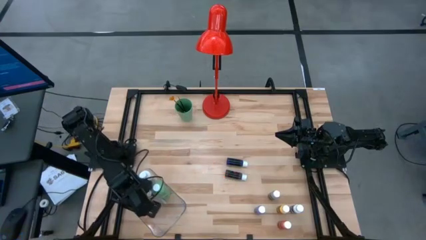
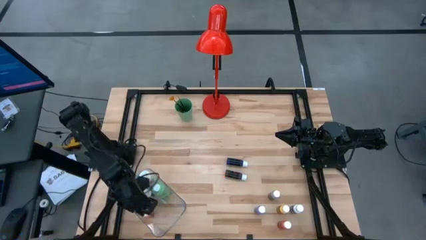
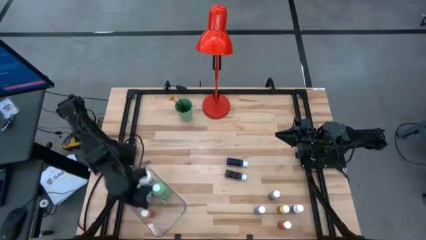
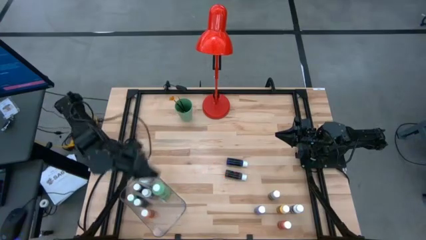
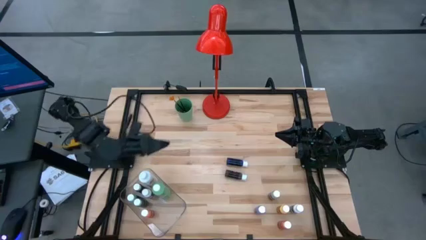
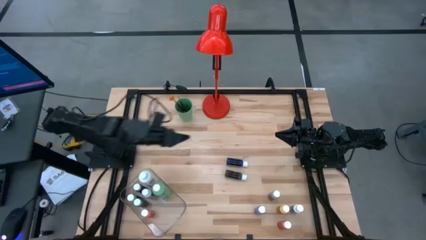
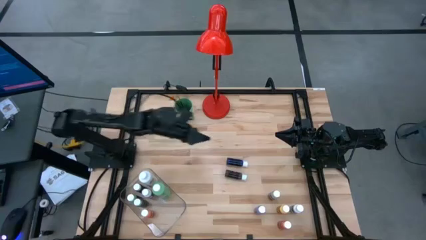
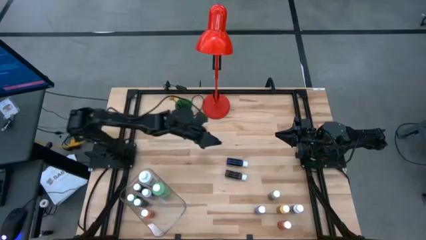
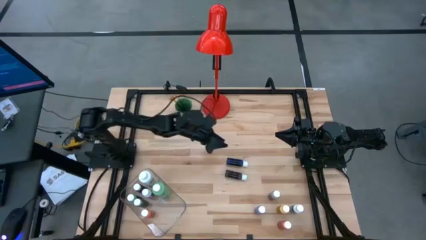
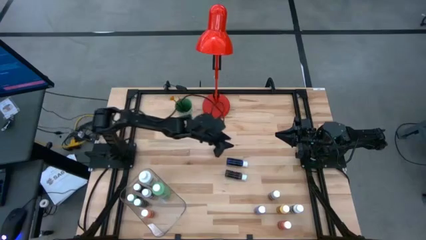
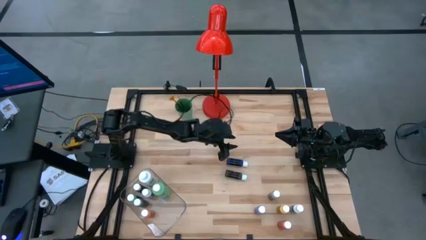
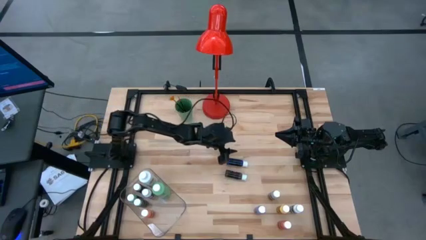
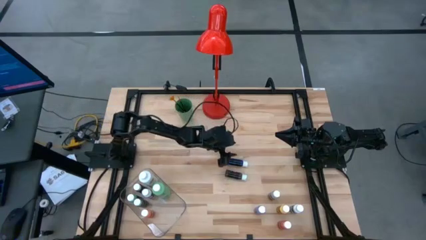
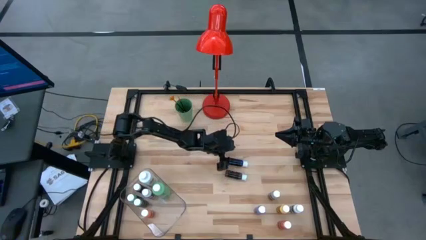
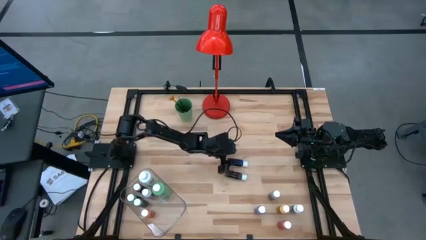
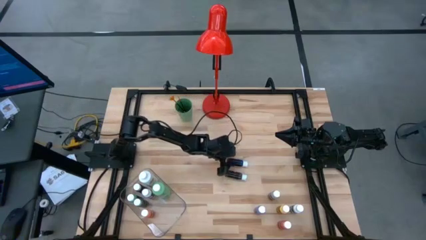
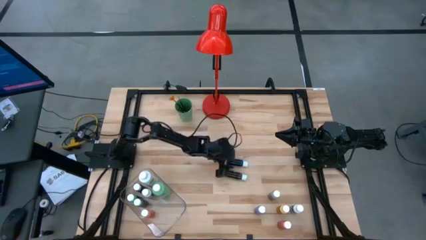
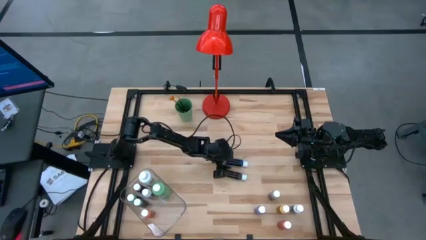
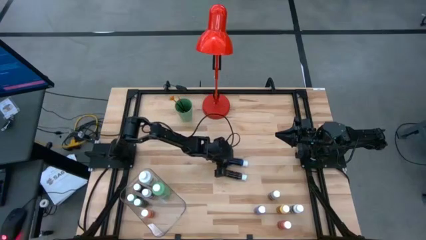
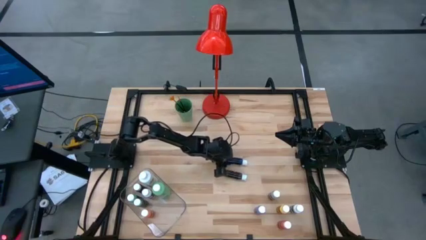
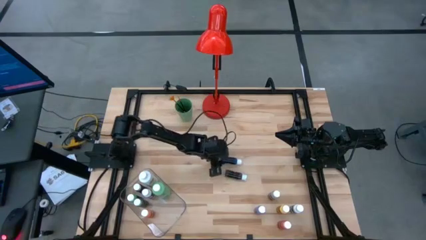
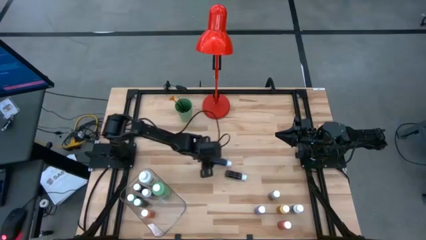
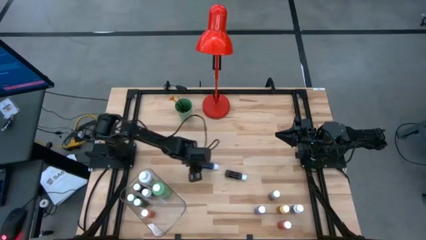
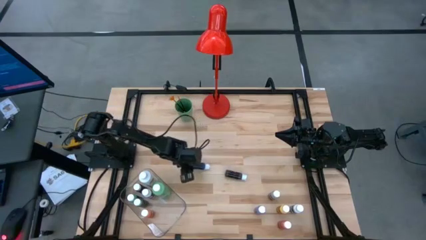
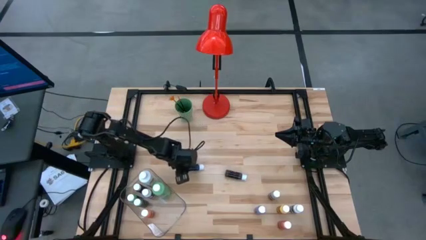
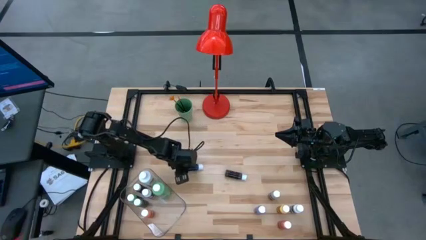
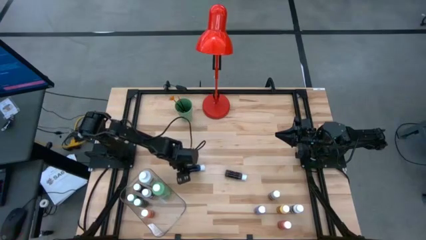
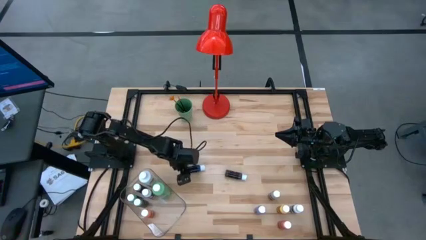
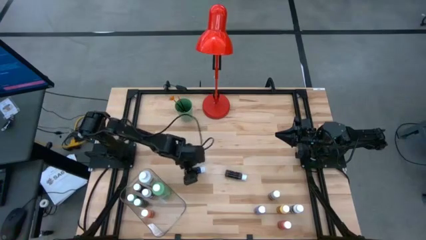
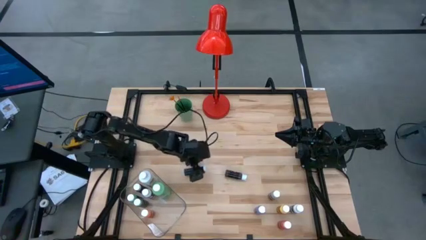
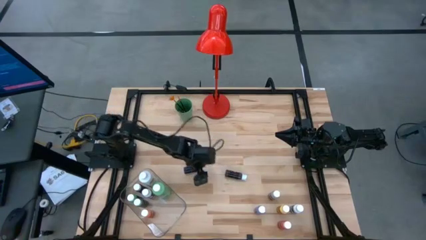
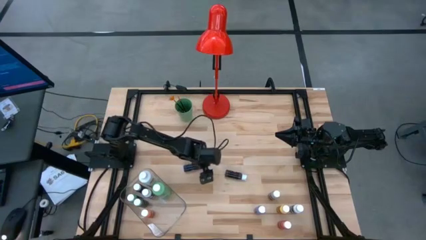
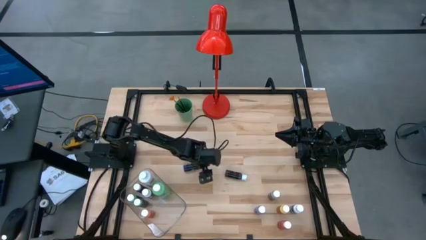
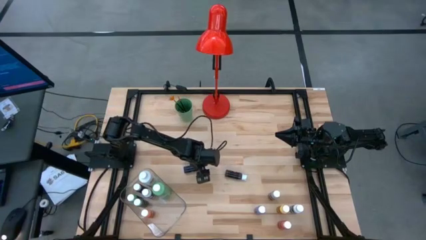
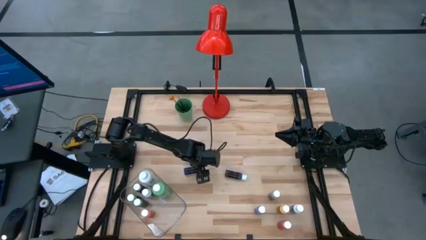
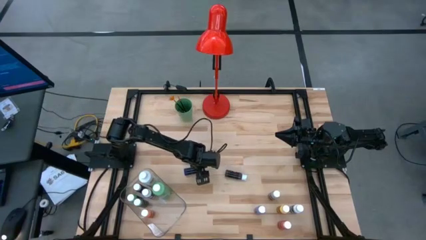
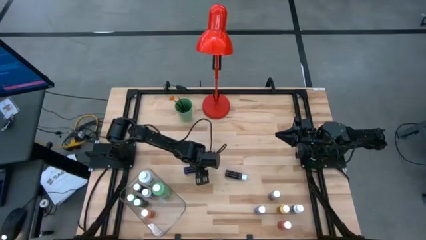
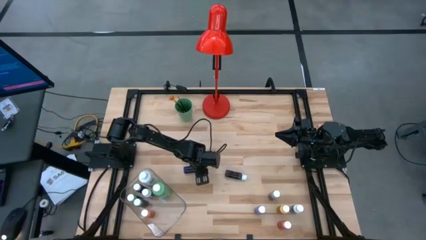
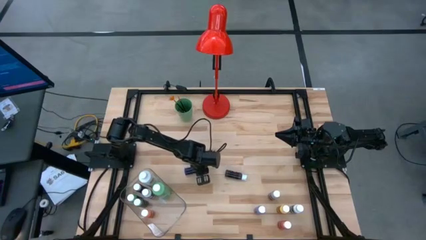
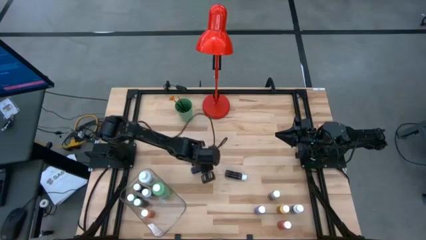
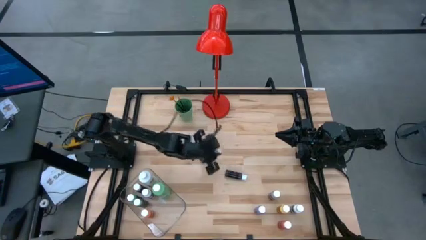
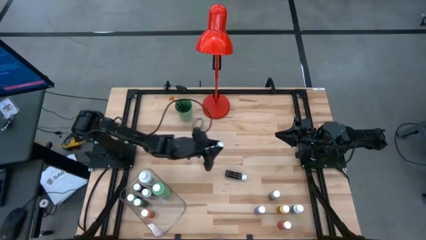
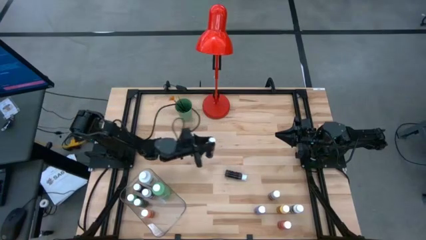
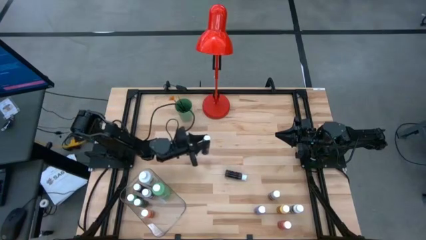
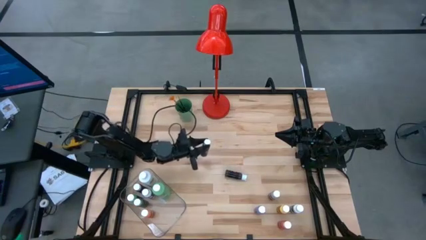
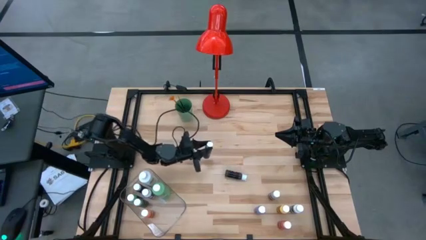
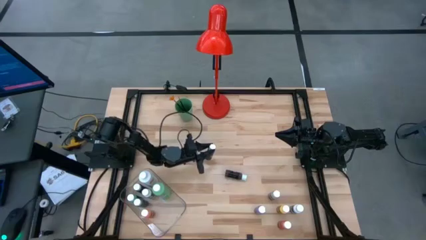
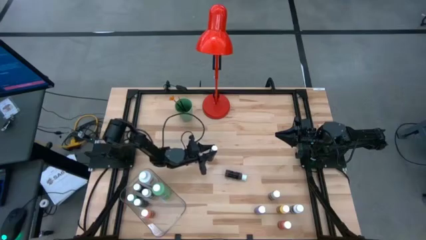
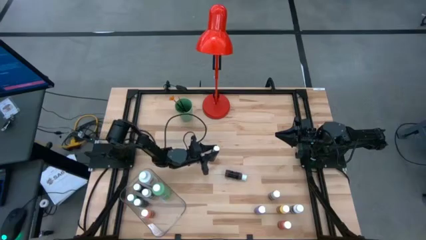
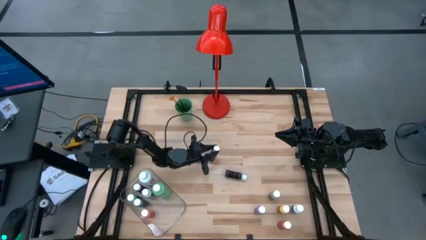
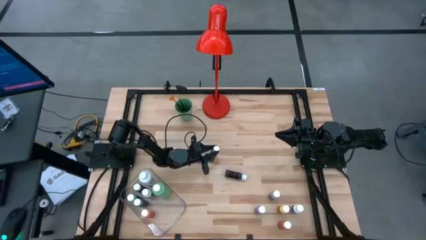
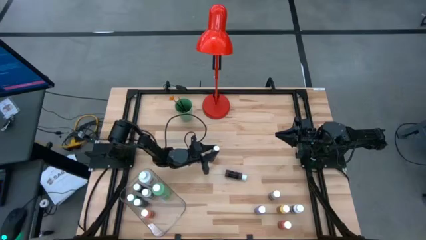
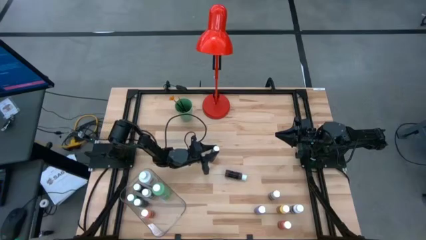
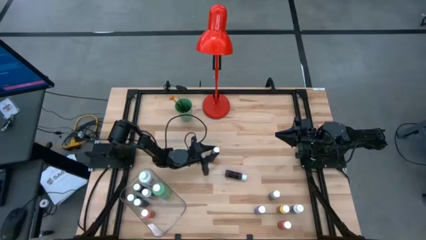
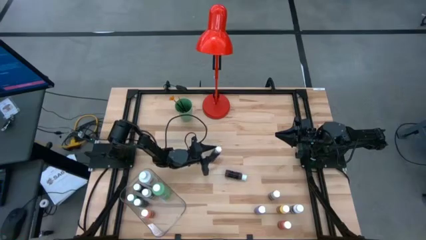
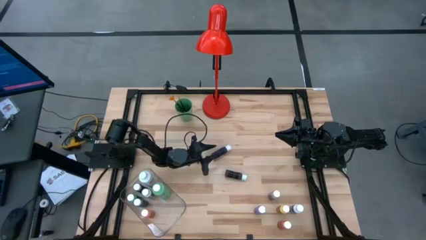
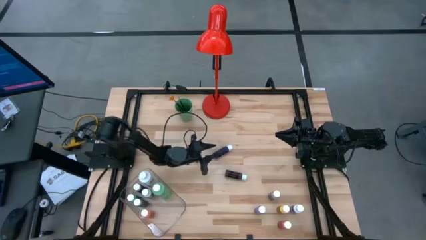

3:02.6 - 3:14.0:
Task: Pick & Place Paint Supplies
Adjust the blue coloring bottle to the center of the table

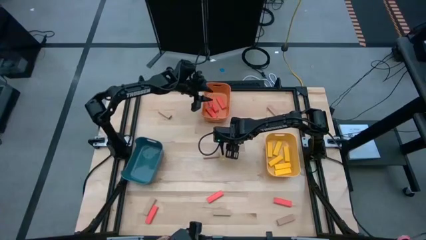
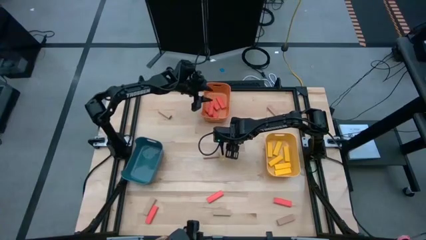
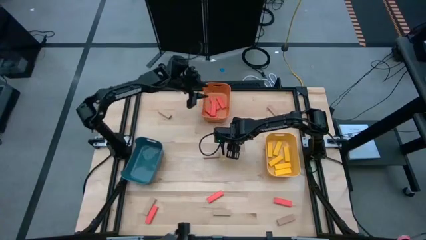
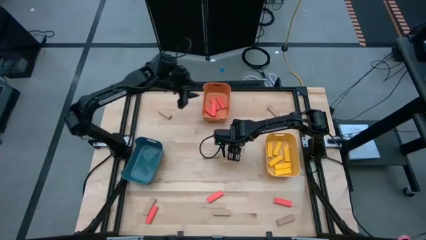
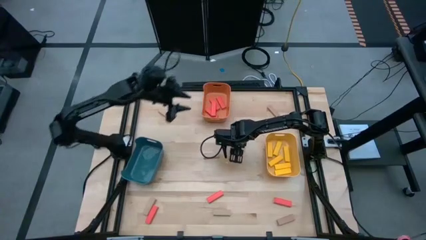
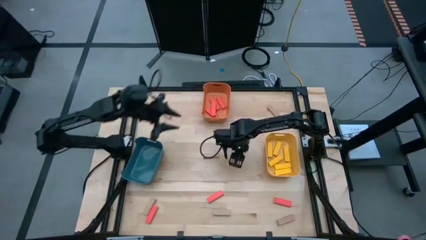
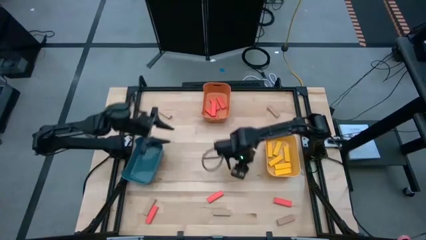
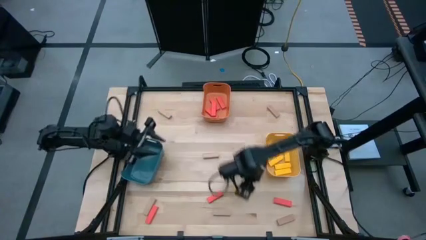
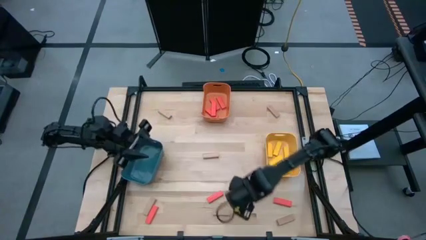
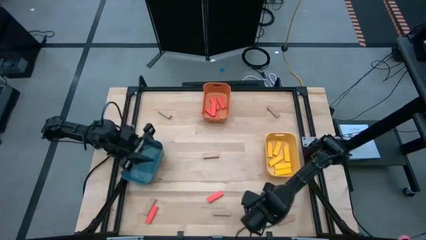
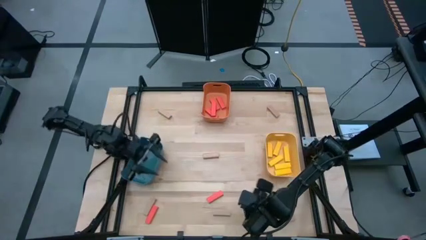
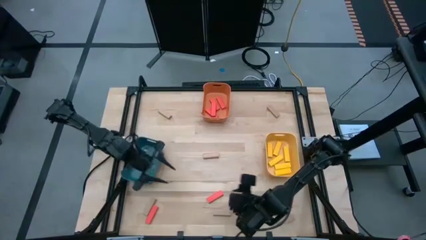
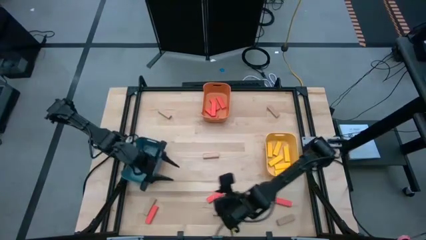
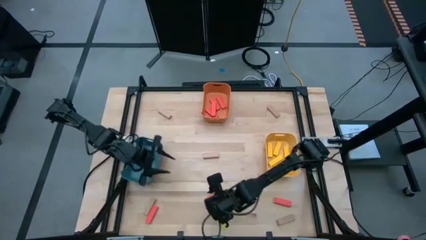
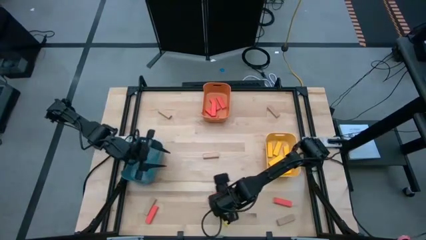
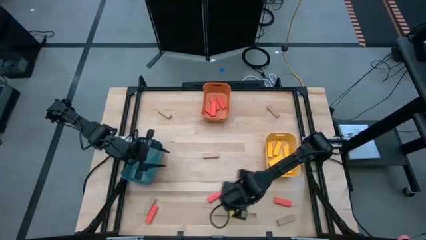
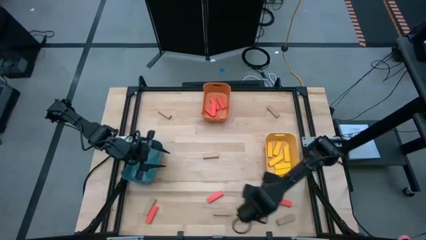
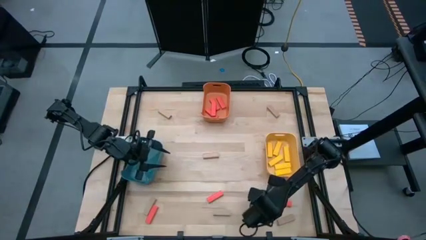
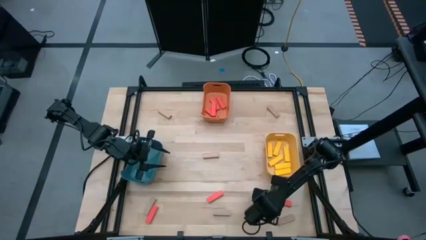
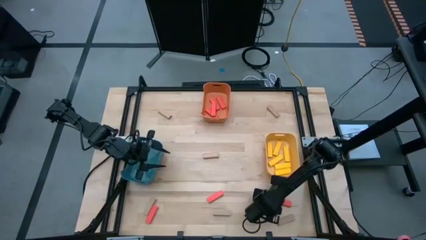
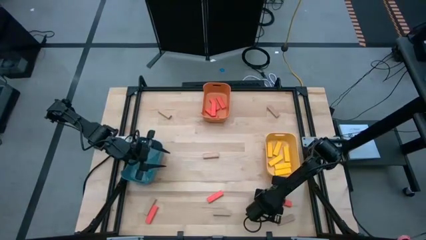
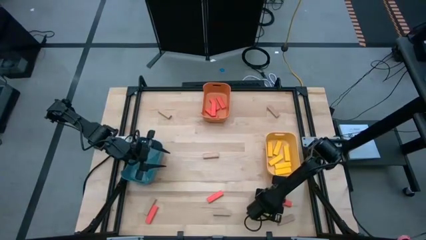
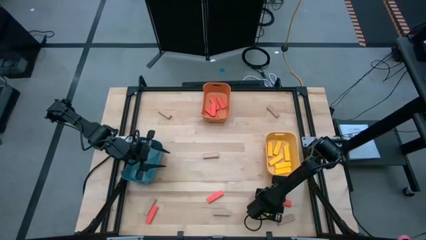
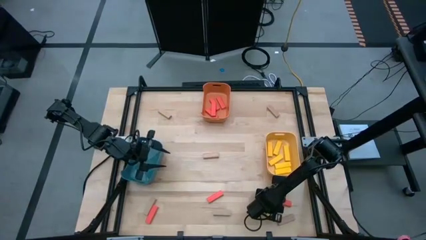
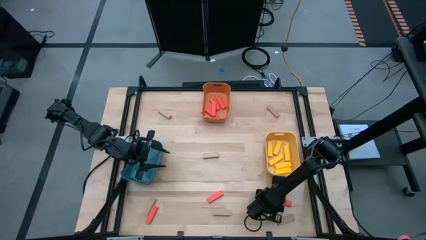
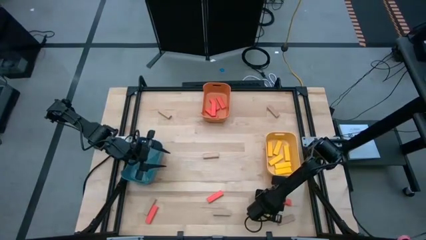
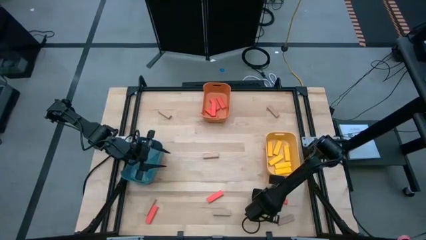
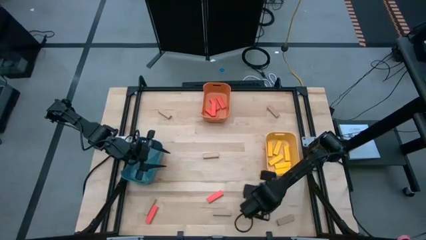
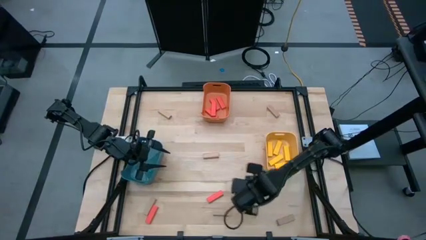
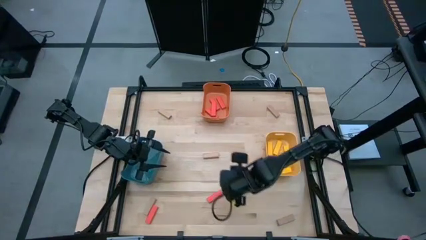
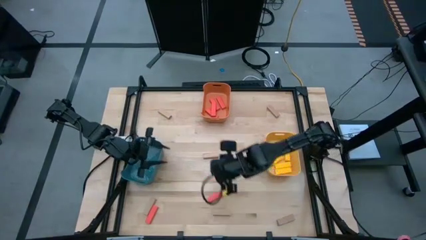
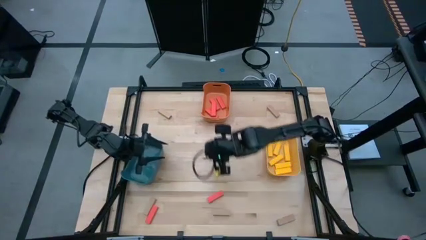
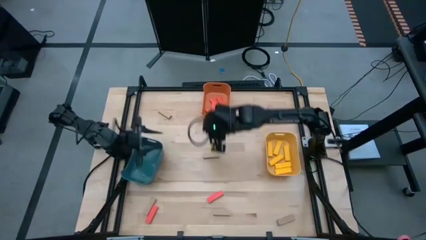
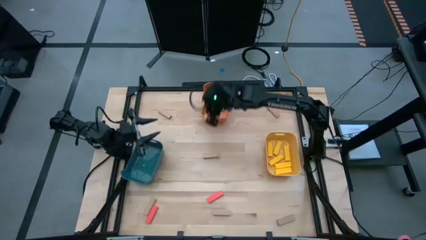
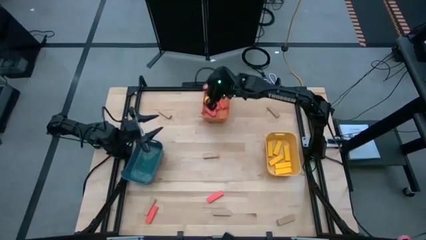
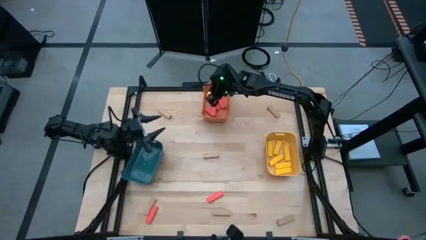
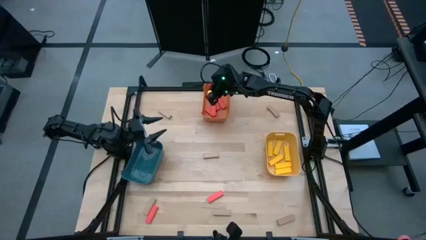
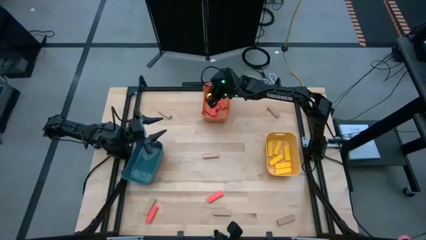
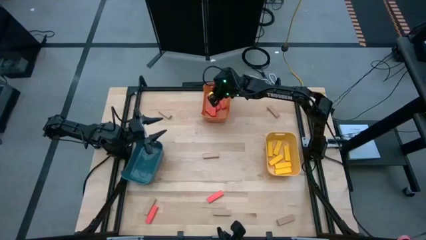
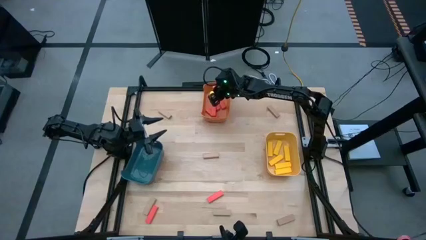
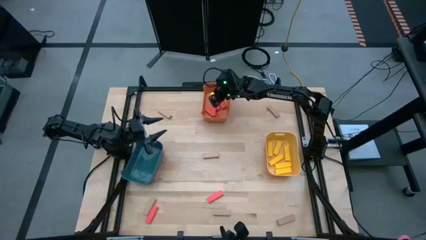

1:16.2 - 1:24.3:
Task: Sort blocks
Put the bottom right orange block into the orange bin
